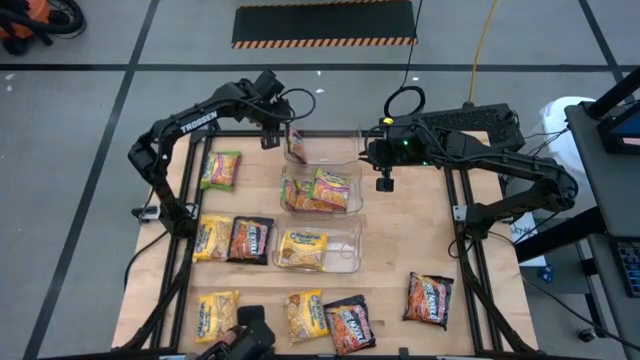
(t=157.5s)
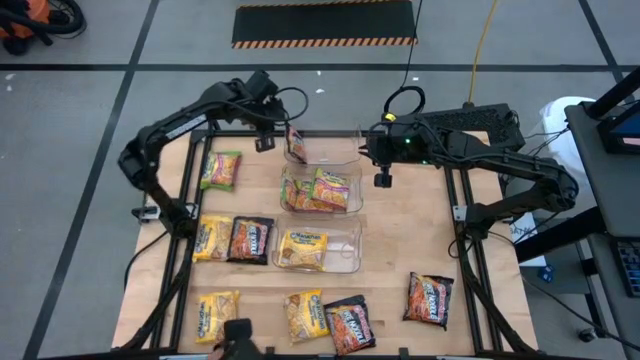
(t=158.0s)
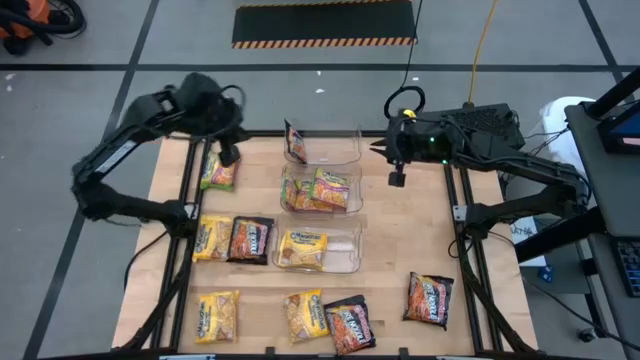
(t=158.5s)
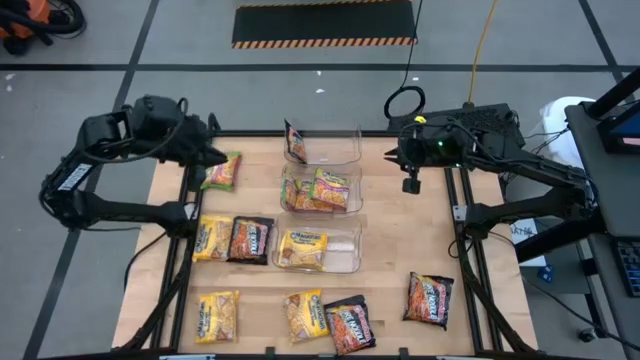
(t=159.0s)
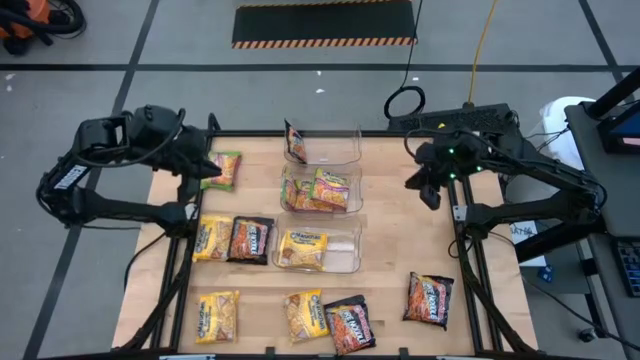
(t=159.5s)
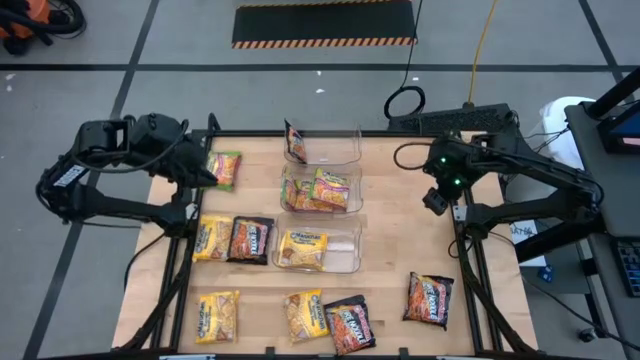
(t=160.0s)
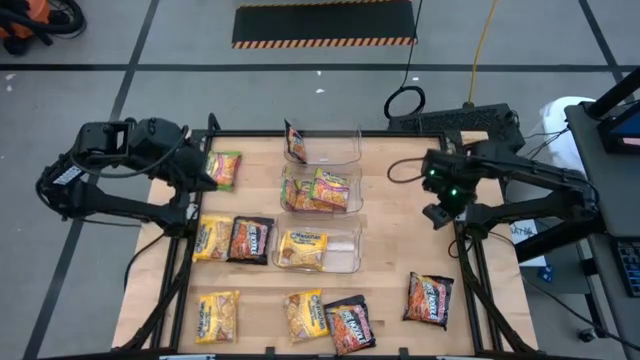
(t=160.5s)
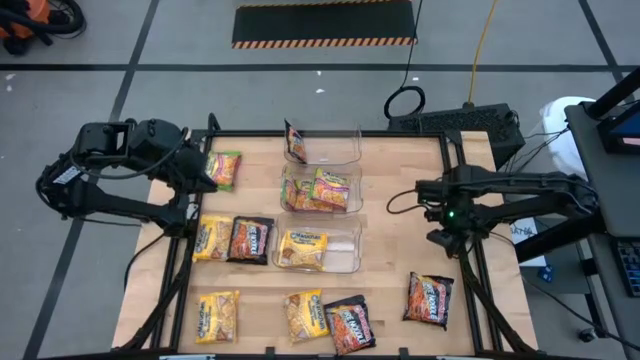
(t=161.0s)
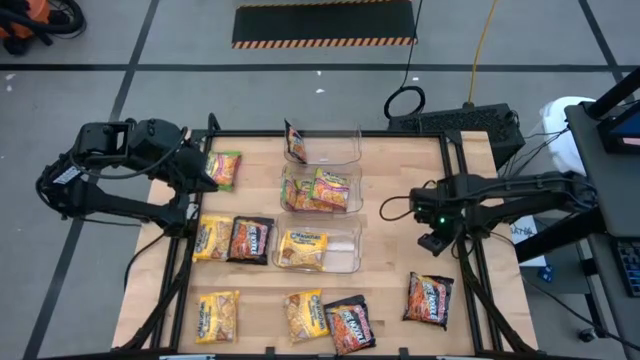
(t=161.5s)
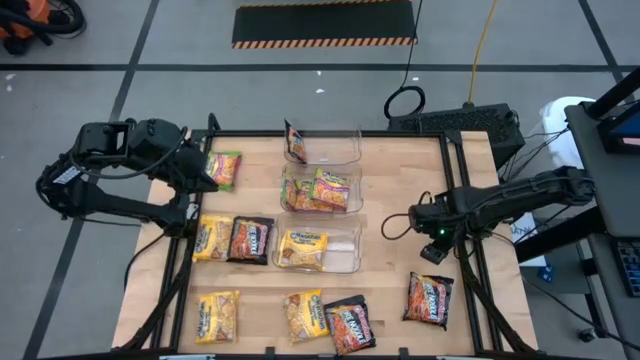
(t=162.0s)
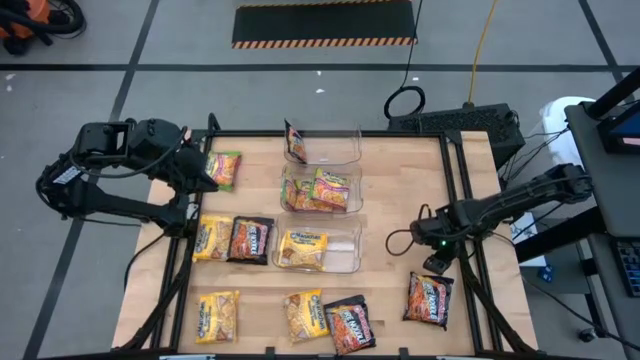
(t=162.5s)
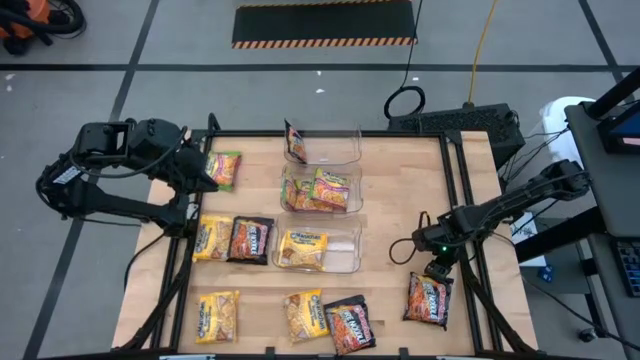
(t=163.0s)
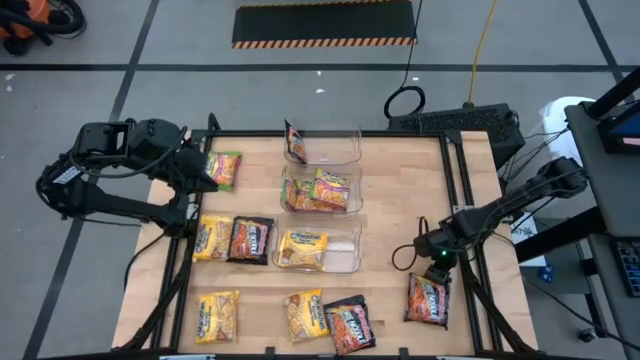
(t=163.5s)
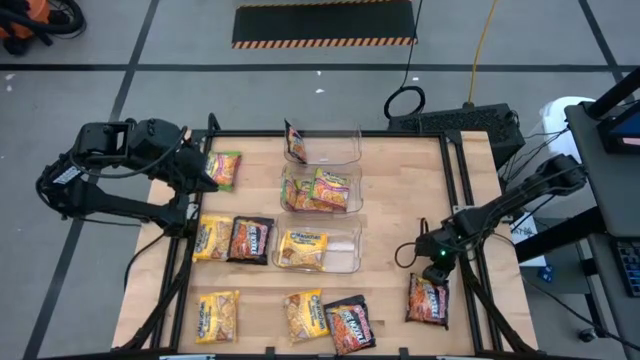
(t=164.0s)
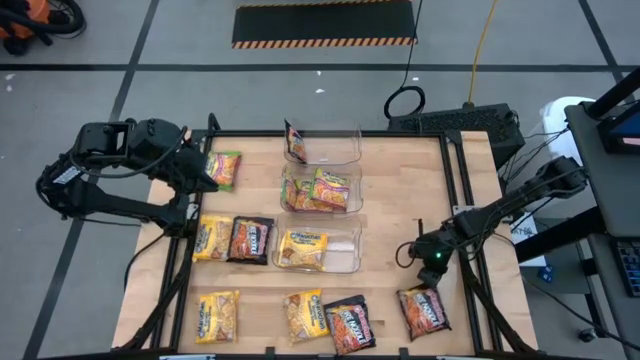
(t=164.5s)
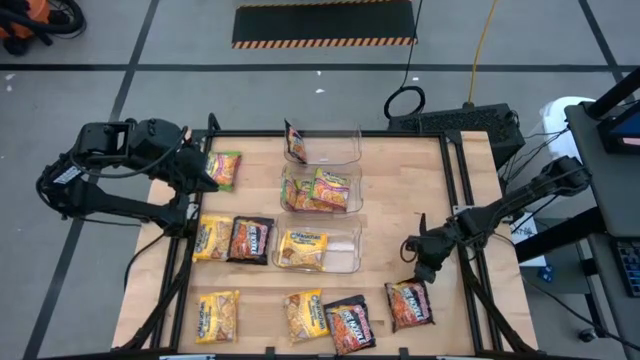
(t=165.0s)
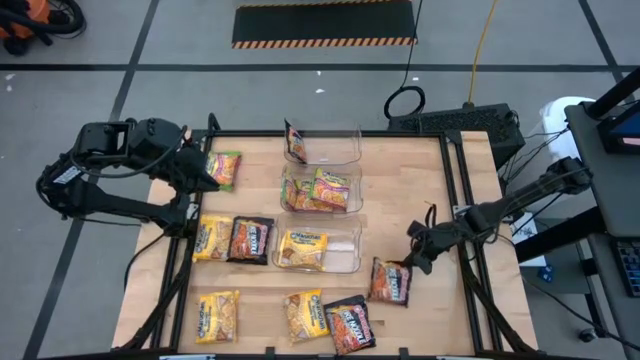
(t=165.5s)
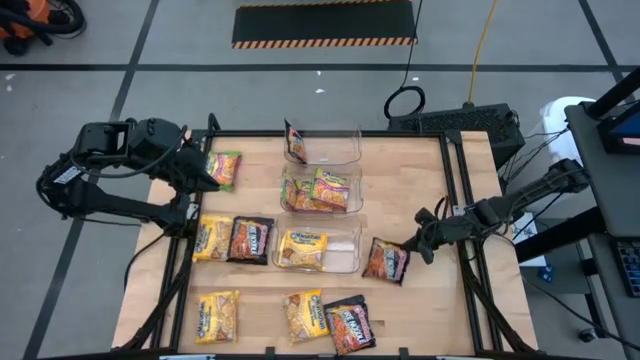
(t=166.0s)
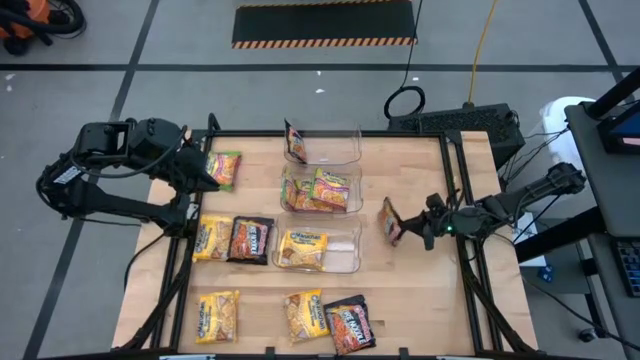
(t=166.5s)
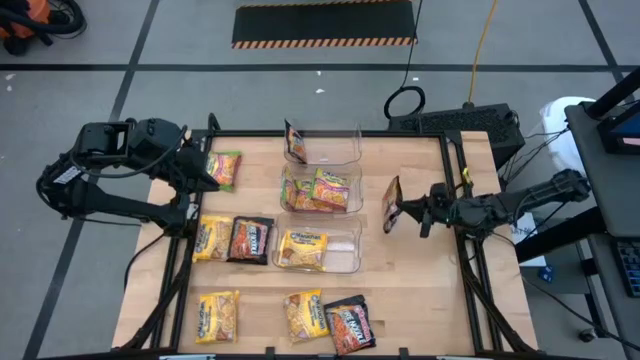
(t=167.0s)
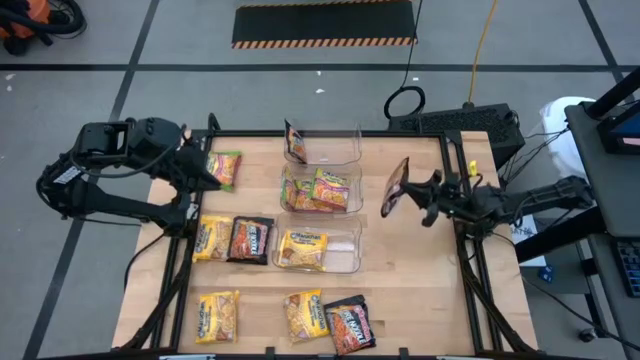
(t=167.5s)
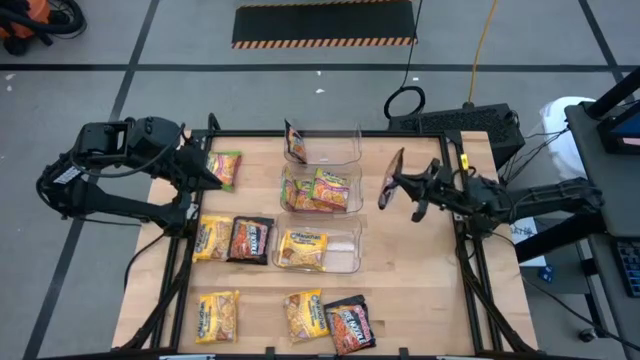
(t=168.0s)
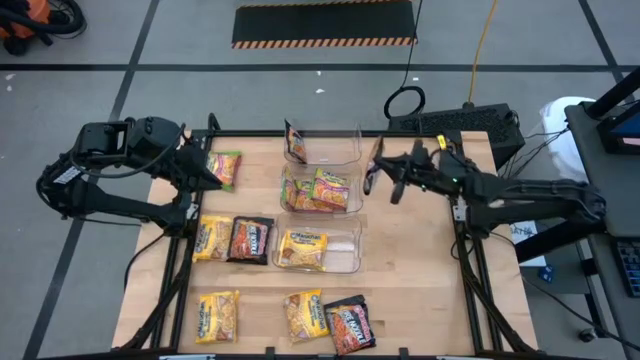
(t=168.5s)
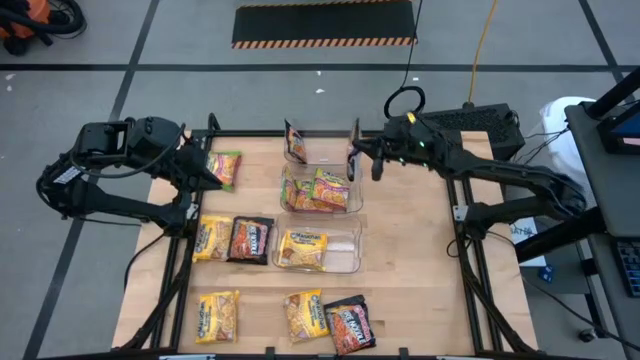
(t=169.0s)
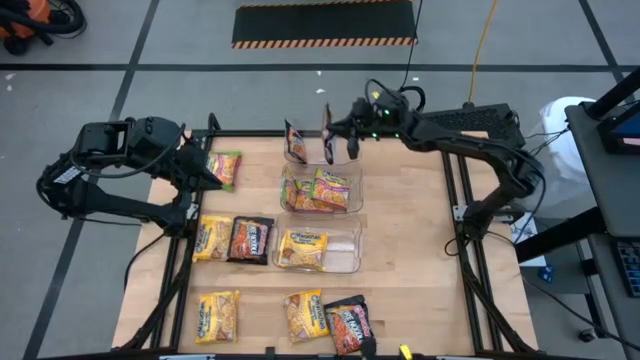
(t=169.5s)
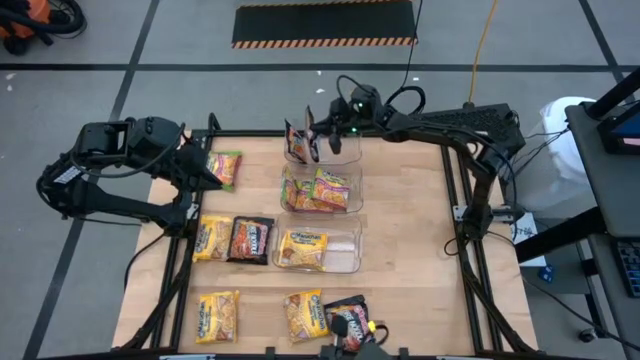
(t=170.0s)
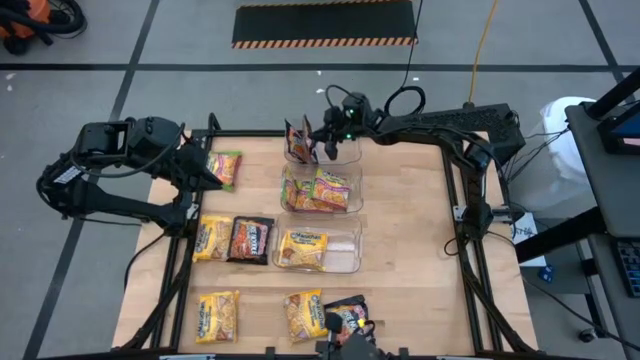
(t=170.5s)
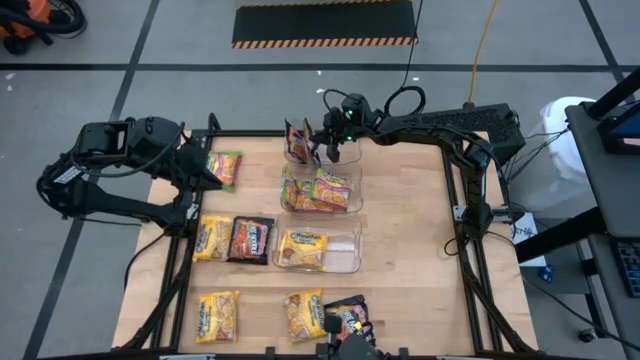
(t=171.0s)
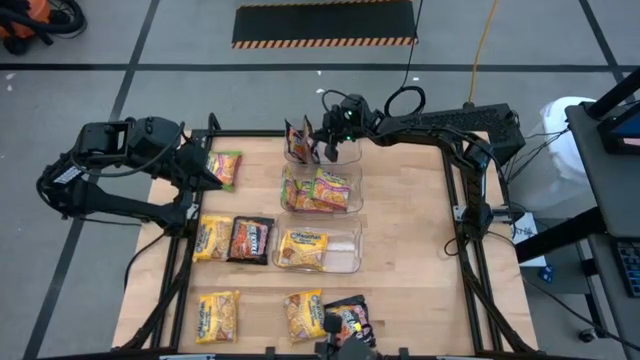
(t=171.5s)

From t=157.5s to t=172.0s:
Task: Sort Maruchan noodles
Put the black noodle pack into the top transparent bin

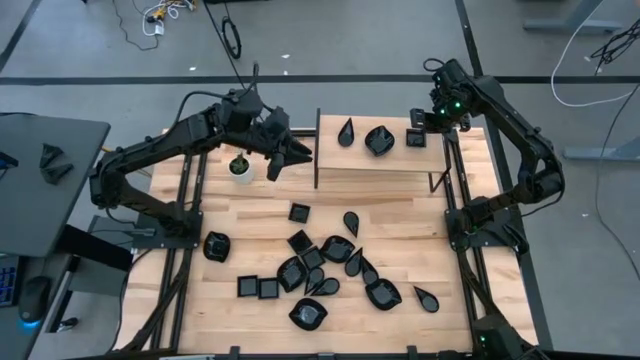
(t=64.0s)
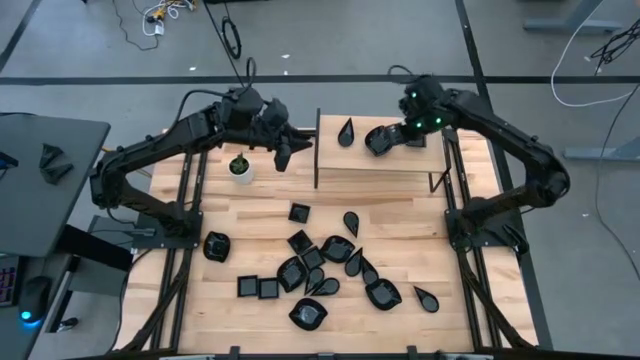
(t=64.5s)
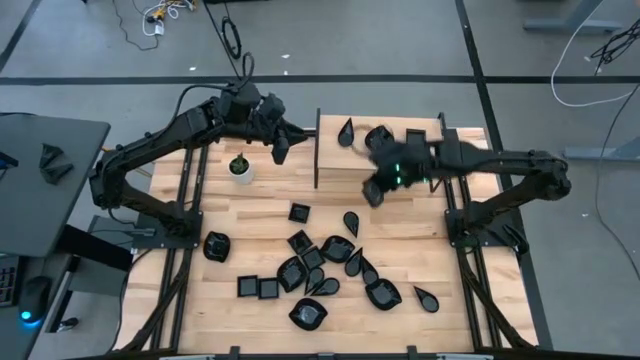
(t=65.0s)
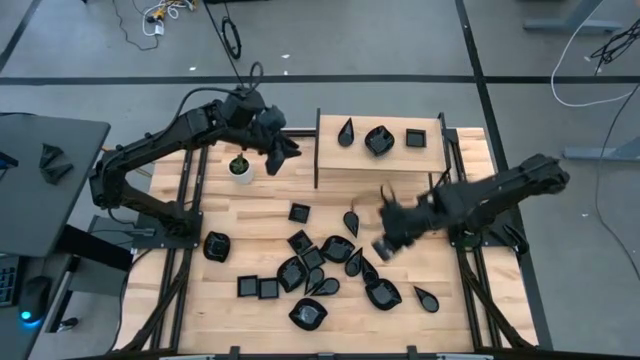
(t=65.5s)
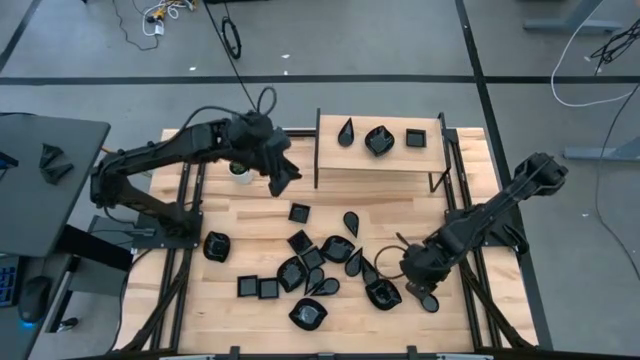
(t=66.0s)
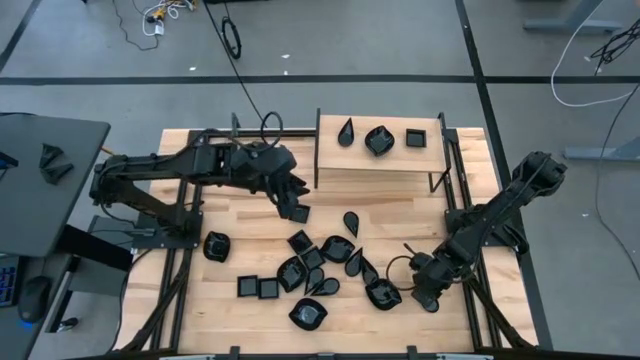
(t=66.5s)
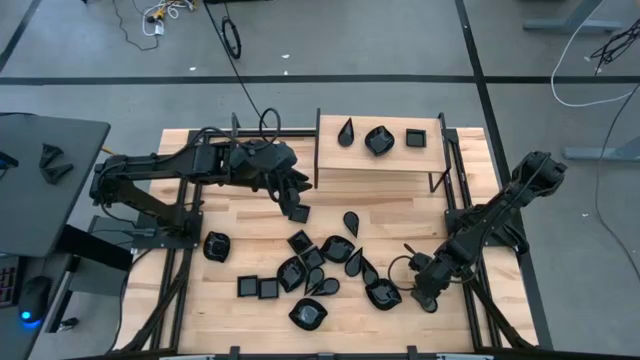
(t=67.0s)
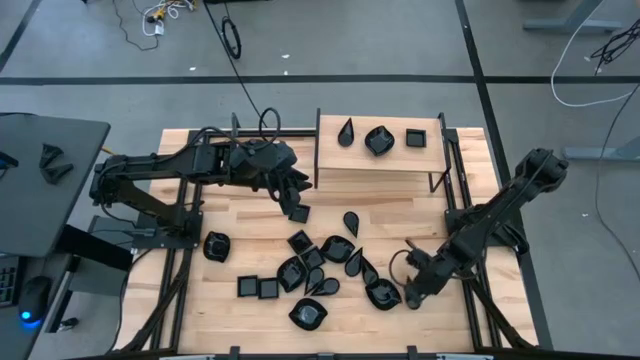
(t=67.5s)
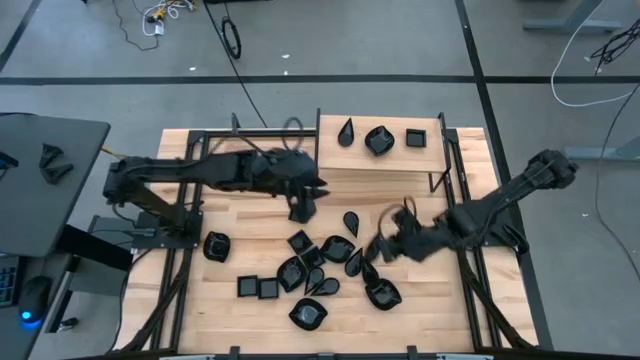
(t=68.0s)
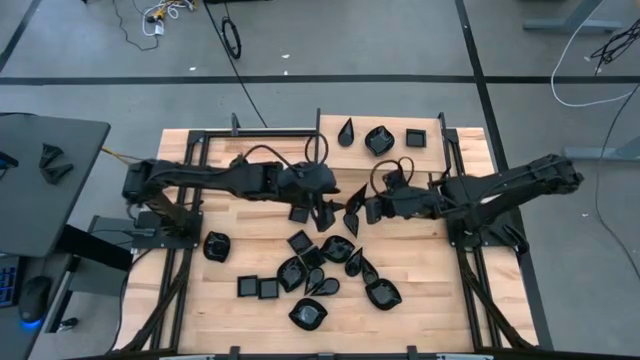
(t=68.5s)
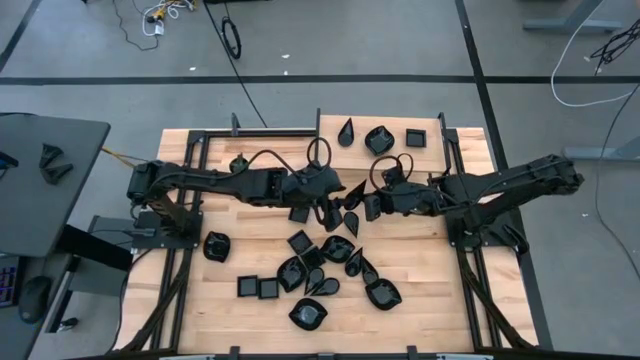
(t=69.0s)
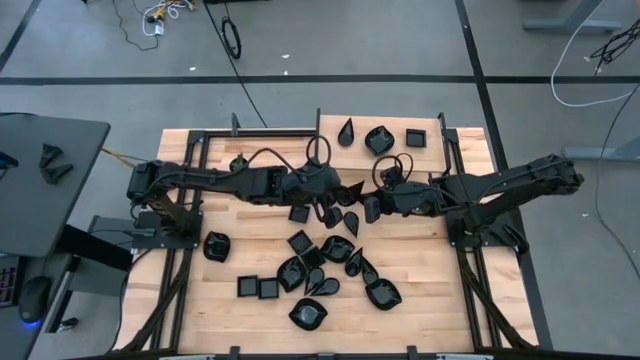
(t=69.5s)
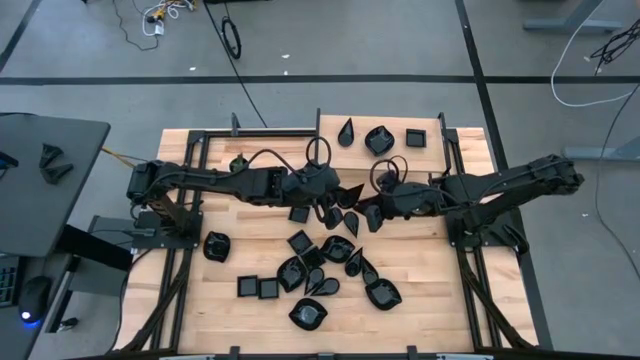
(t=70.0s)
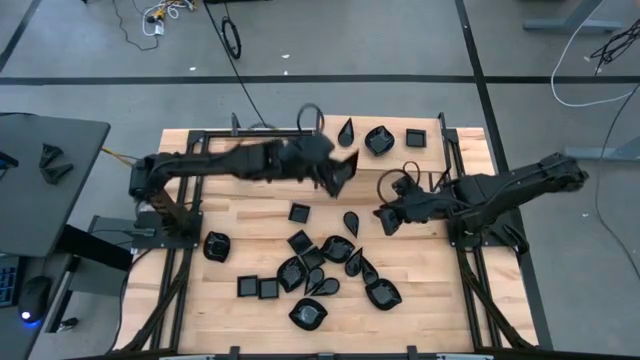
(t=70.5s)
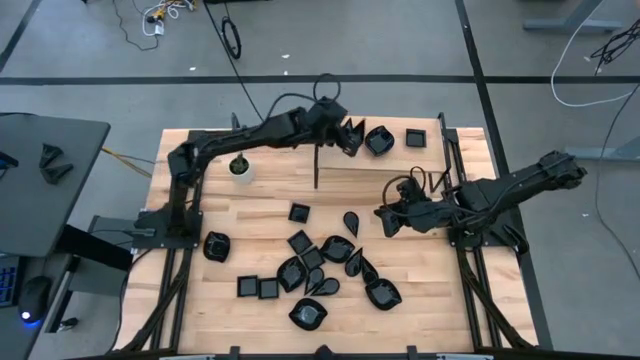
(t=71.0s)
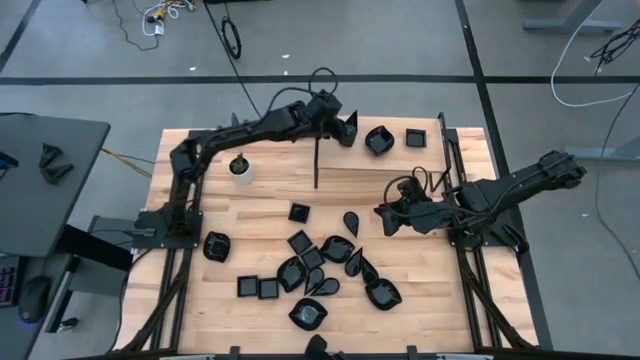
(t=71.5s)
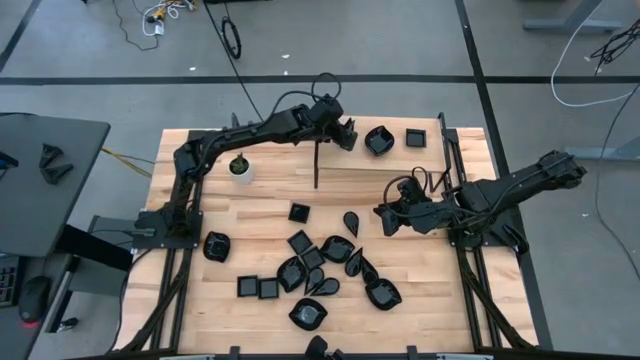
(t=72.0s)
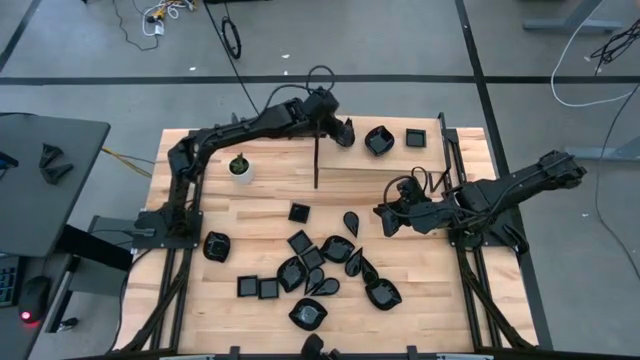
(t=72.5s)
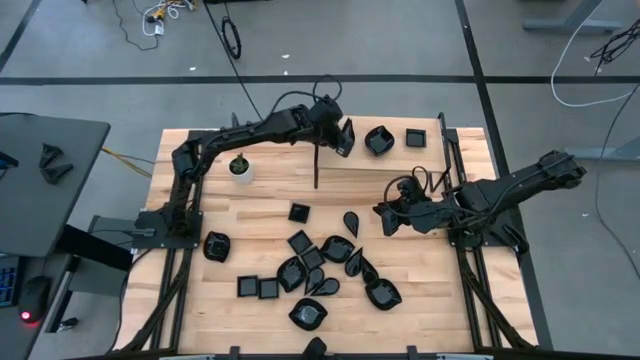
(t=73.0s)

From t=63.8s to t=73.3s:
Task: Pick & Place Mini shaped plates
Stack the drop-shaped plate on top of the drop-shaped plate on the shelf
